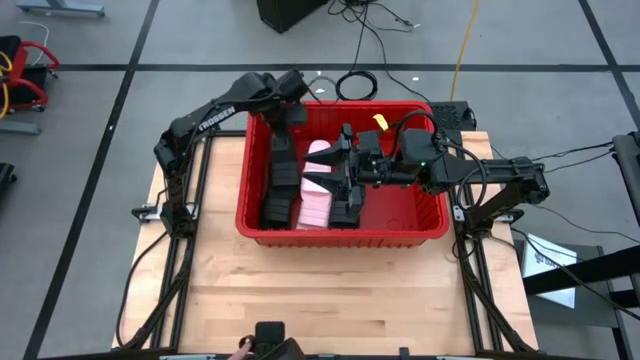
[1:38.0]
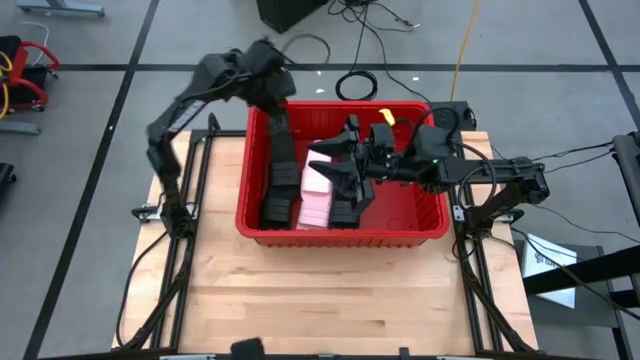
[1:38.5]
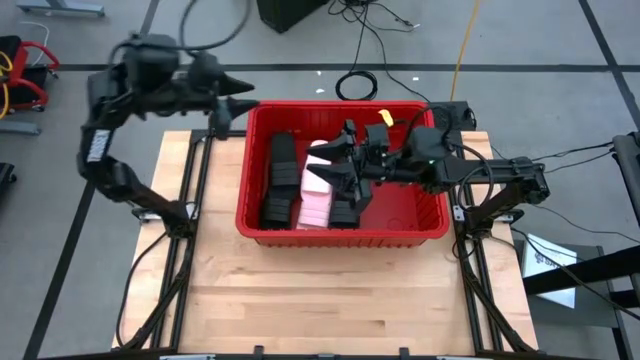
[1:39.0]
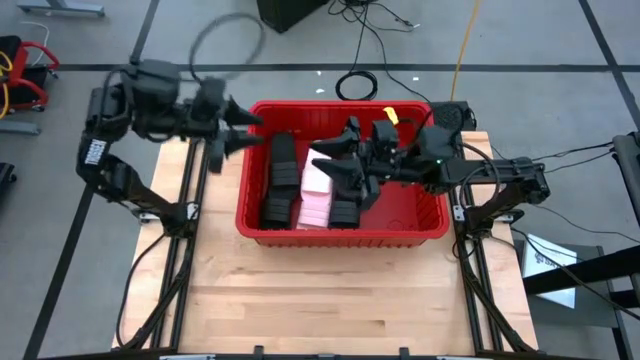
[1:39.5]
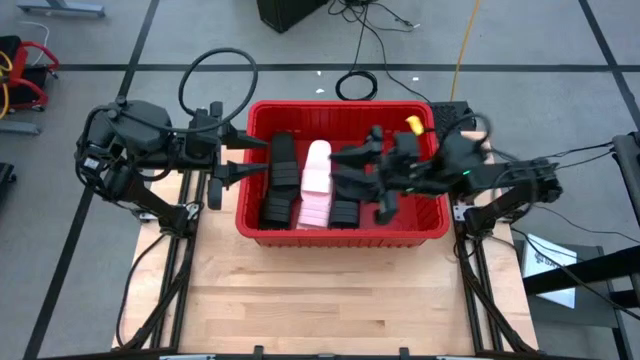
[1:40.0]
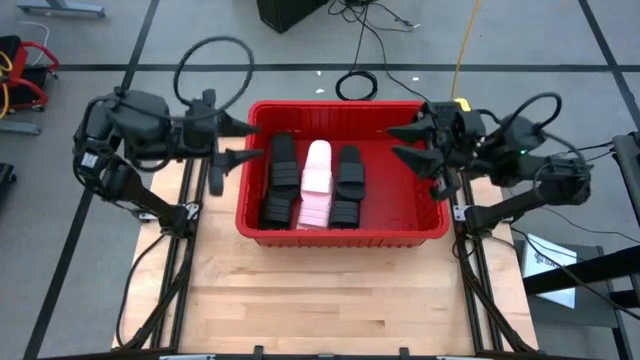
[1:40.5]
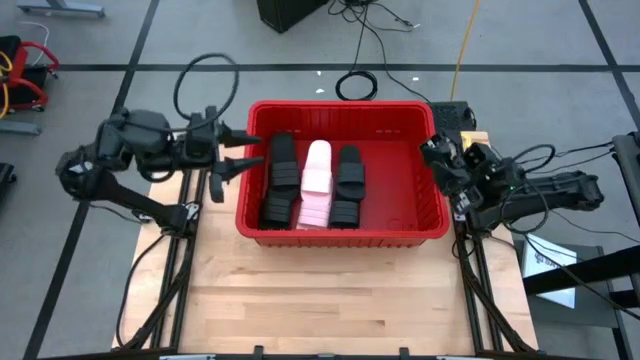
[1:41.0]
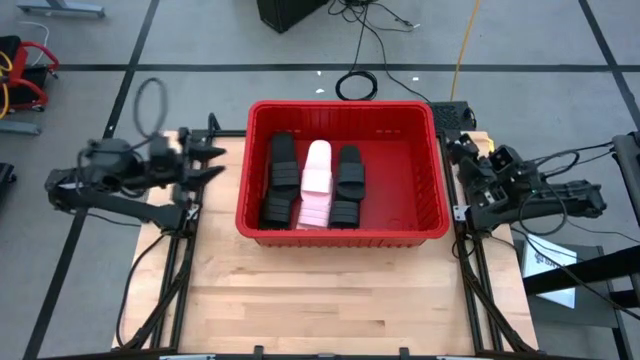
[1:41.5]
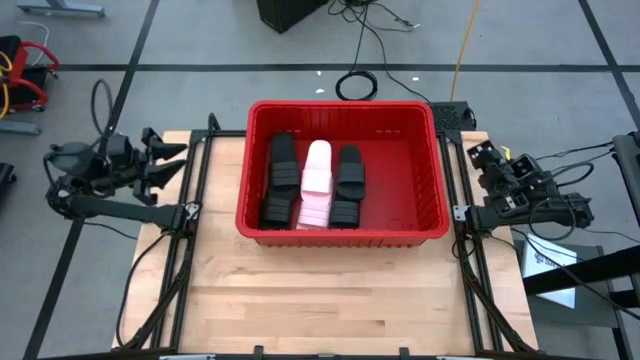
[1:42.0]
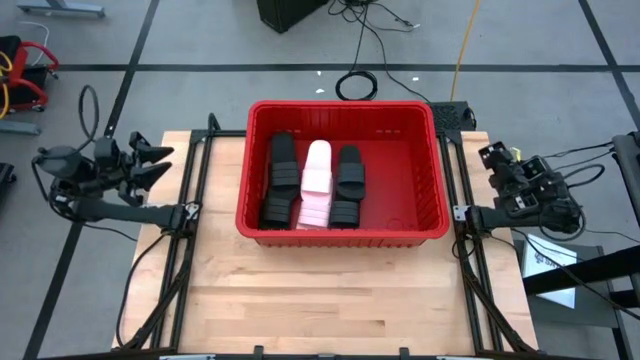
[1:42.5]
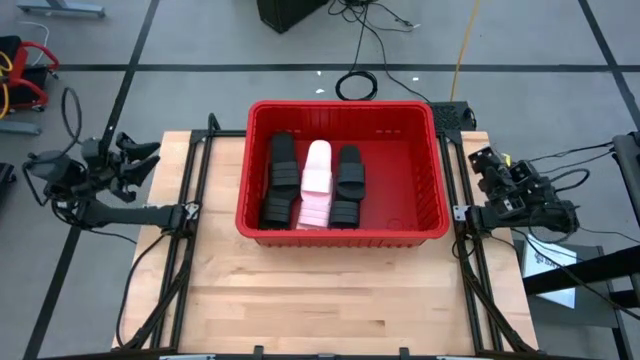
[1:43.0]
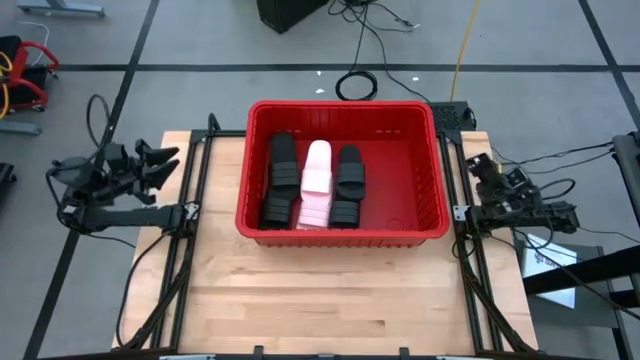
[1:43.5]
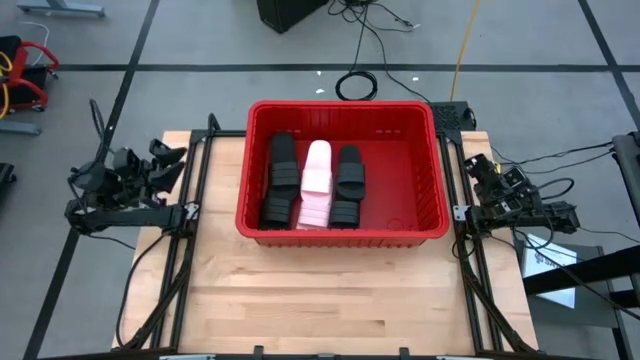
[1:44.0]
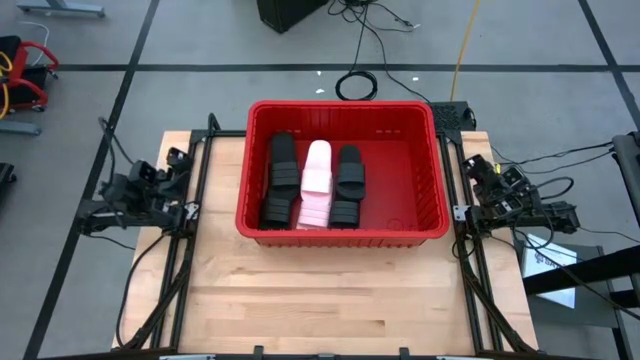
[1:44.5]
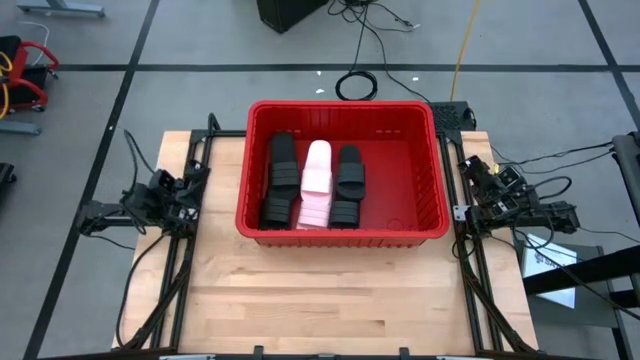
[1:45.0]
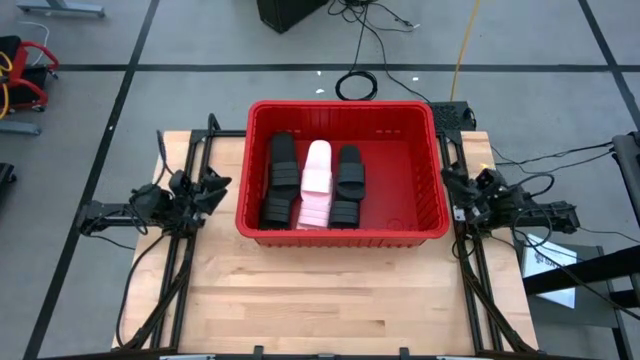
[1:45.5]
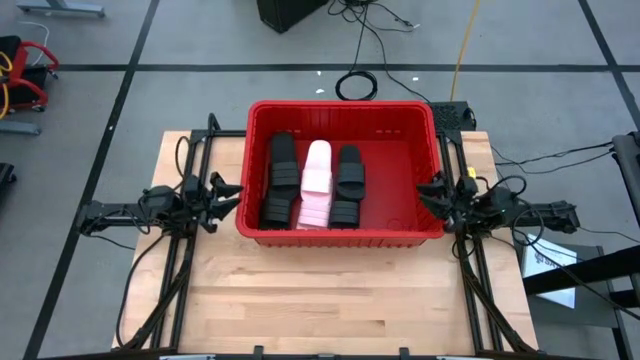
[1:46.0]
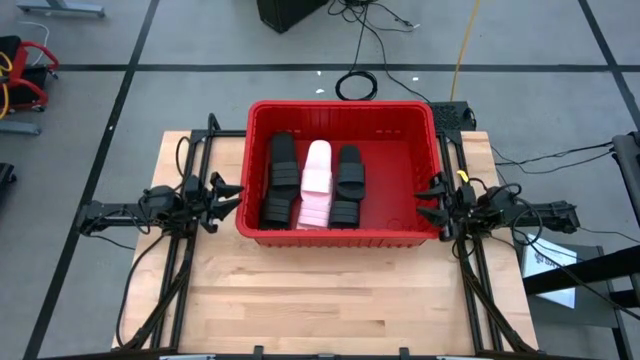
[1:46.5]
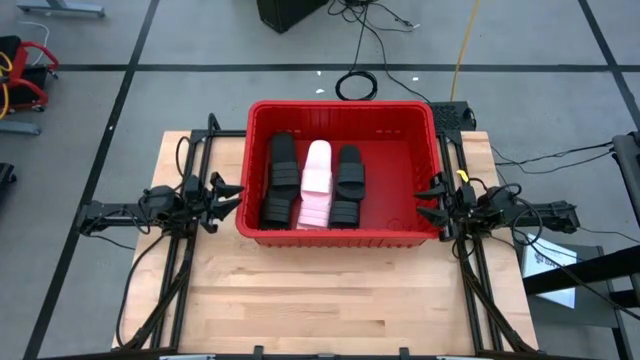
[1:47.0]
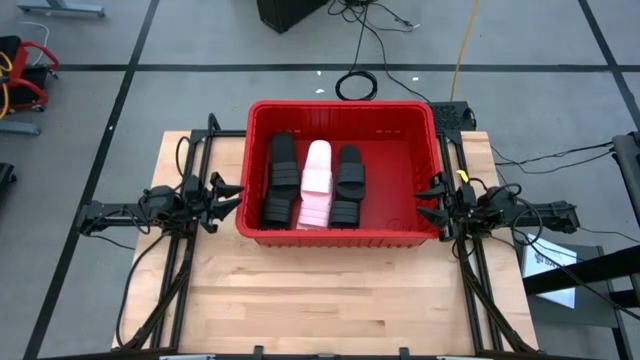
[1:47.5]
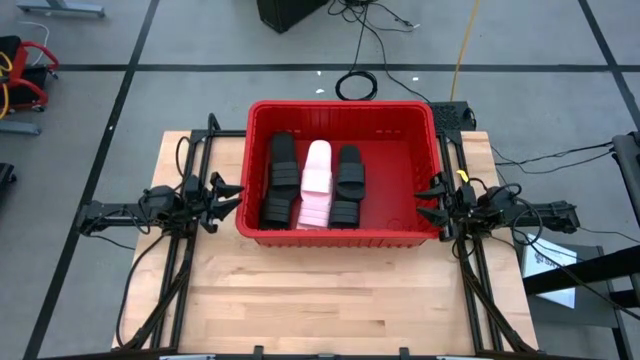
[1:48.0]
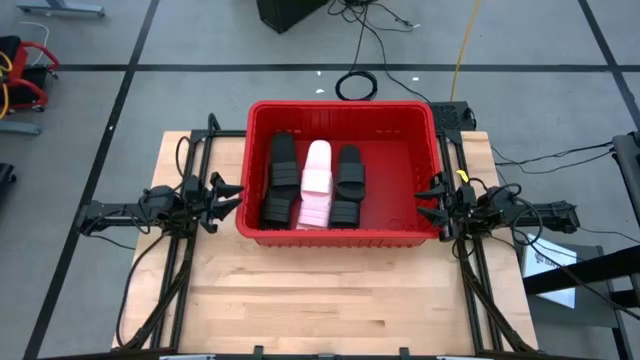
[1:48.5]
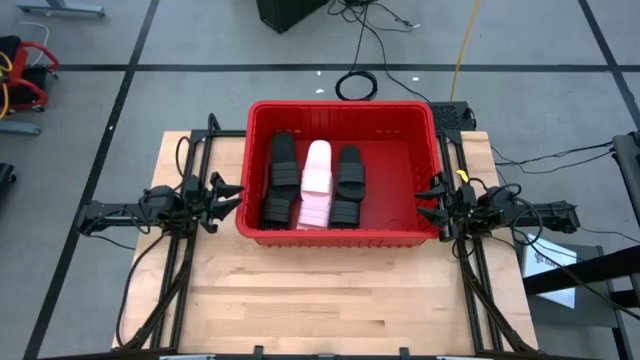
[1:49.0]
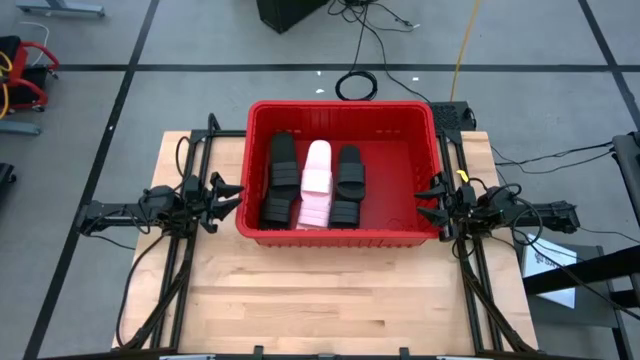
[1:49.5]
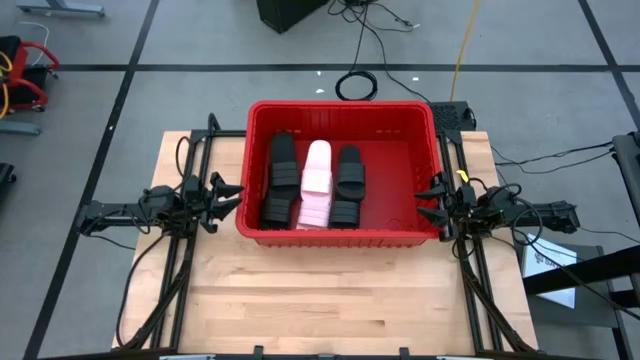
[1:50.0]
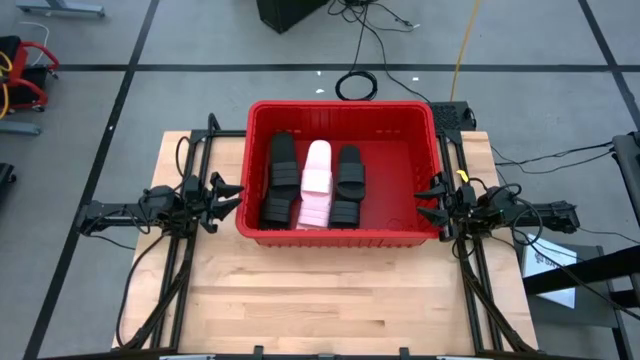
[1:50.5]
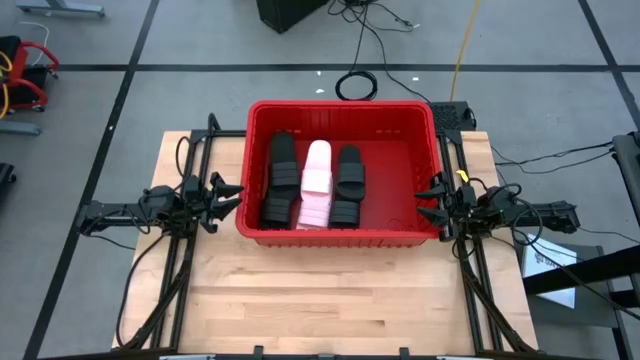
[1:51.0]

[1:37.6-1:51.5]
Task: Pick and place slides into bin
Return to Home Position
